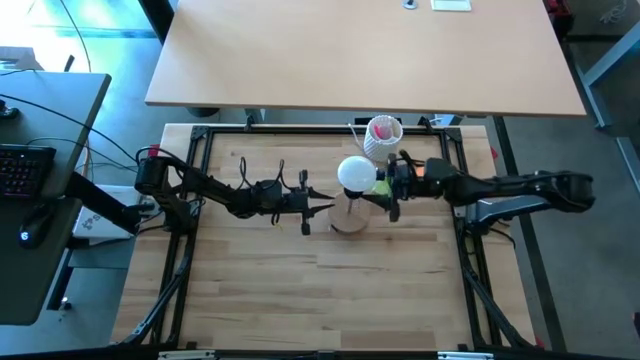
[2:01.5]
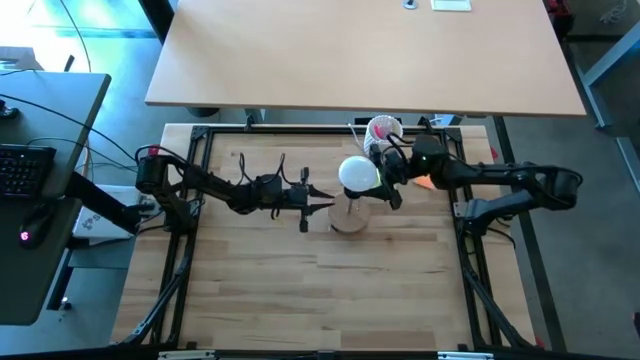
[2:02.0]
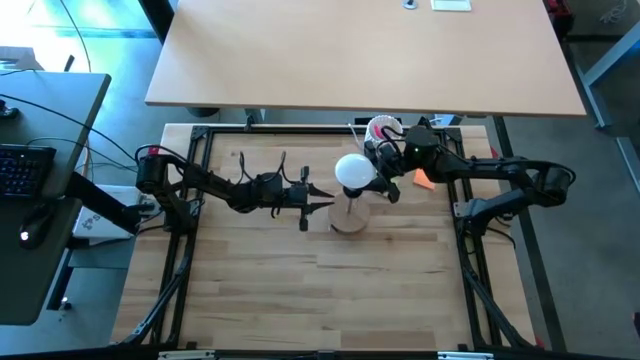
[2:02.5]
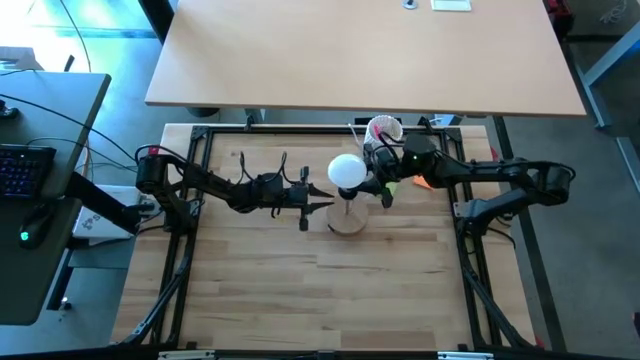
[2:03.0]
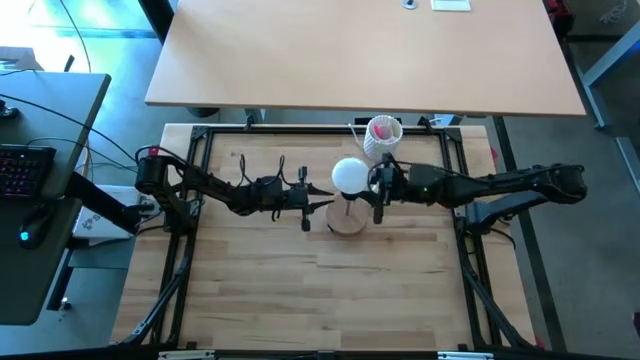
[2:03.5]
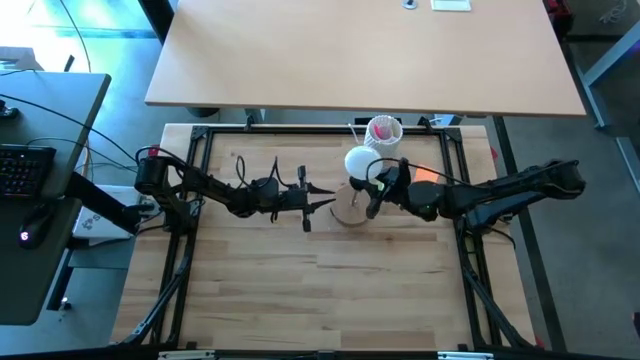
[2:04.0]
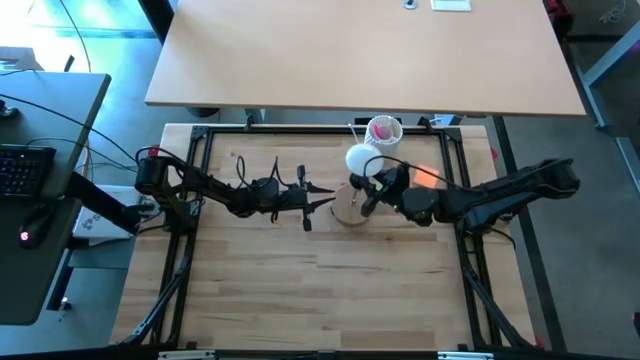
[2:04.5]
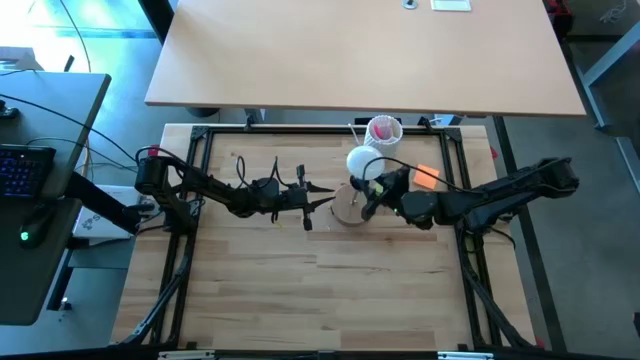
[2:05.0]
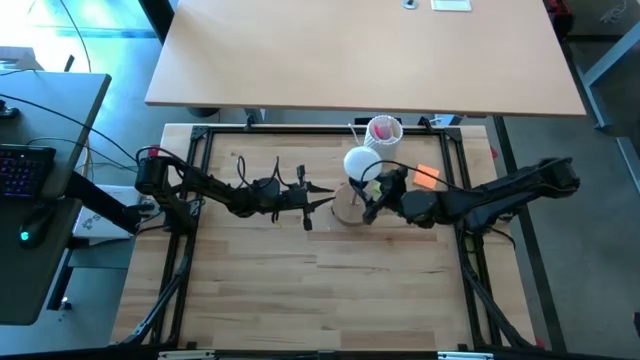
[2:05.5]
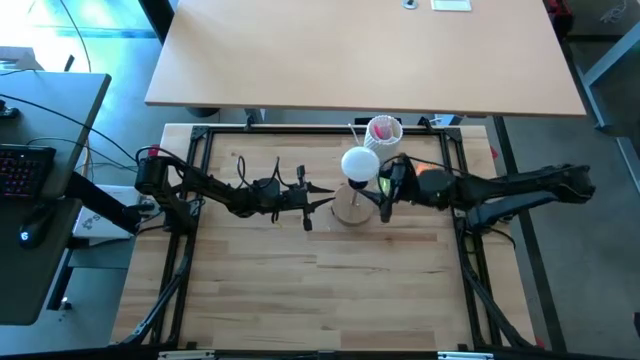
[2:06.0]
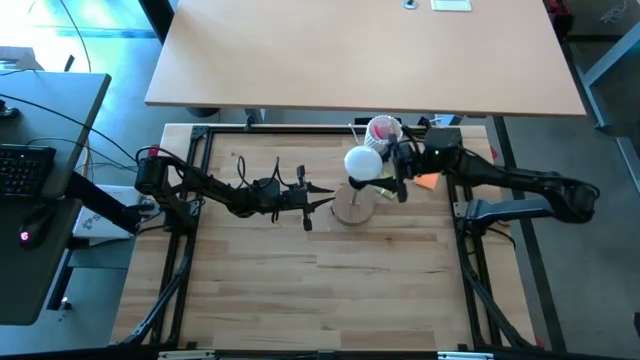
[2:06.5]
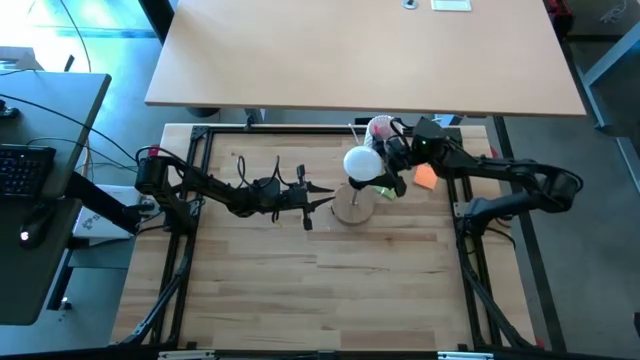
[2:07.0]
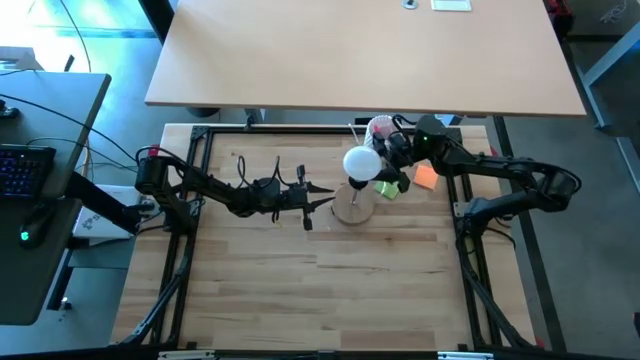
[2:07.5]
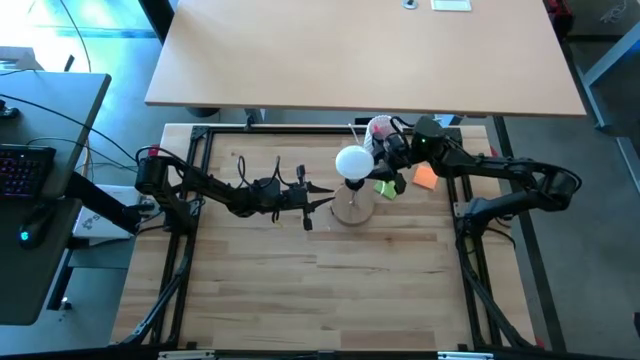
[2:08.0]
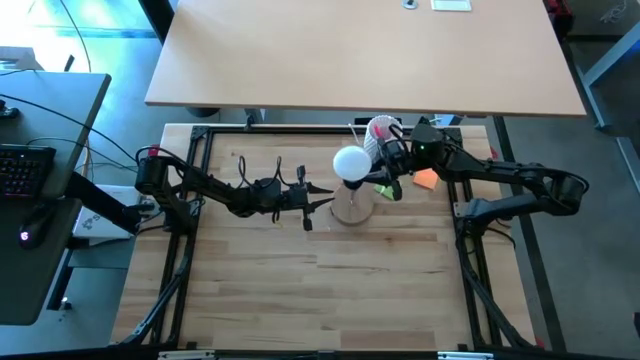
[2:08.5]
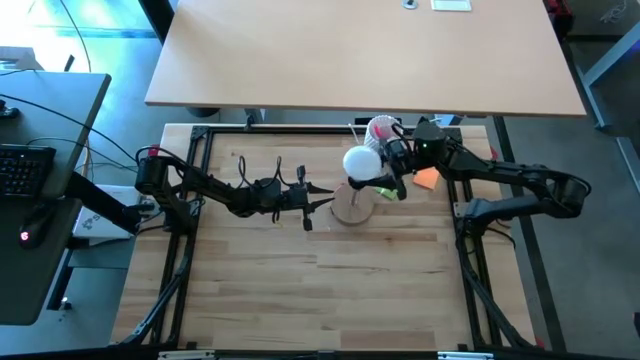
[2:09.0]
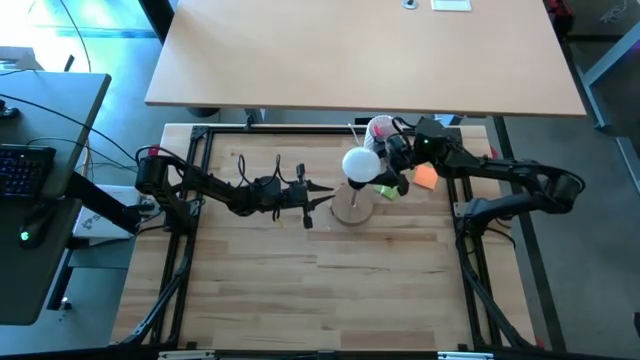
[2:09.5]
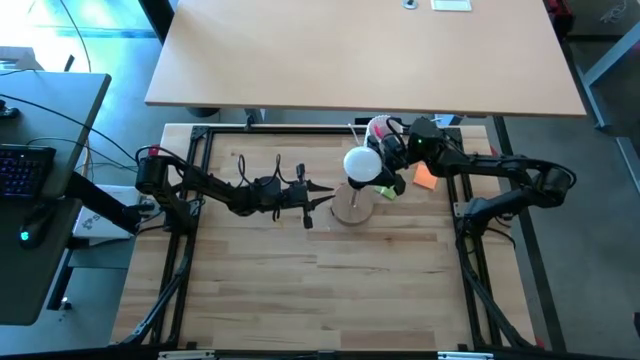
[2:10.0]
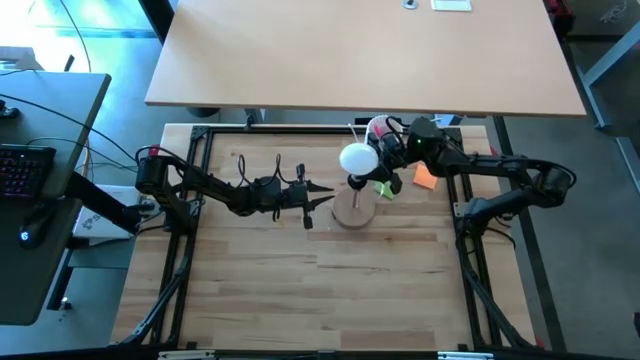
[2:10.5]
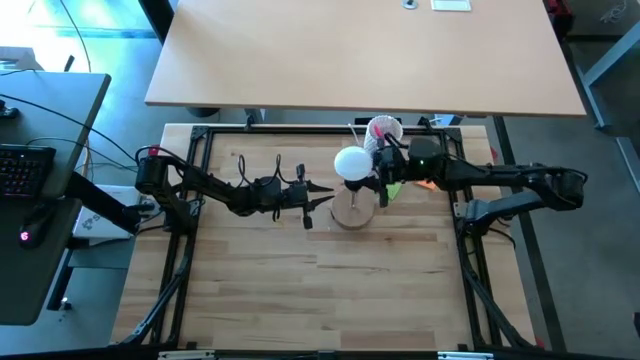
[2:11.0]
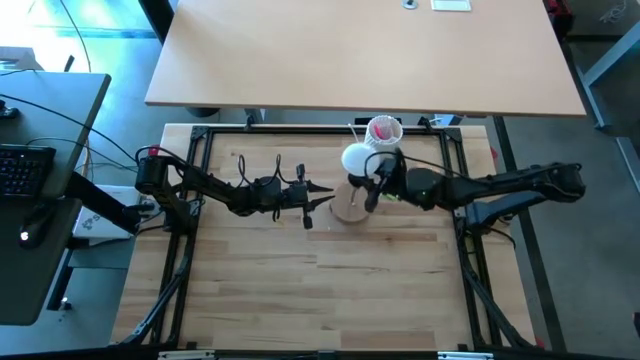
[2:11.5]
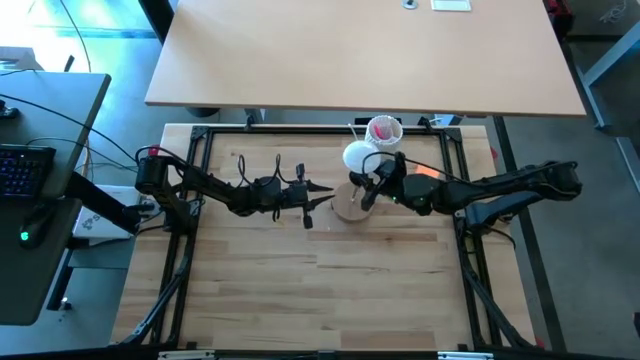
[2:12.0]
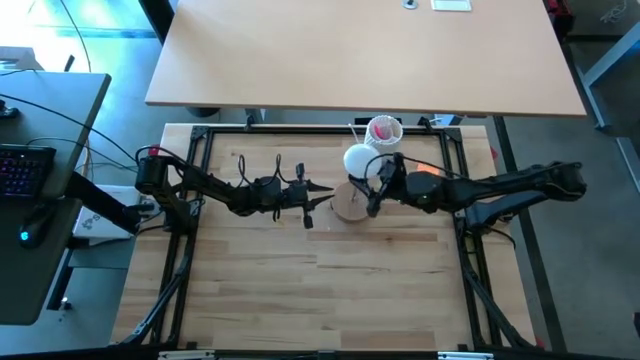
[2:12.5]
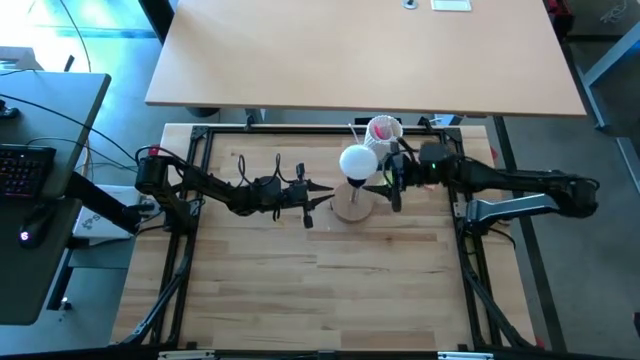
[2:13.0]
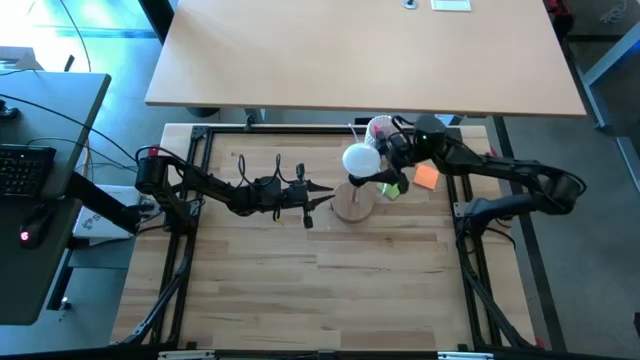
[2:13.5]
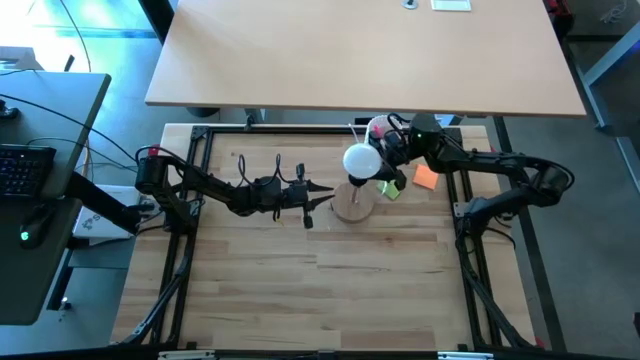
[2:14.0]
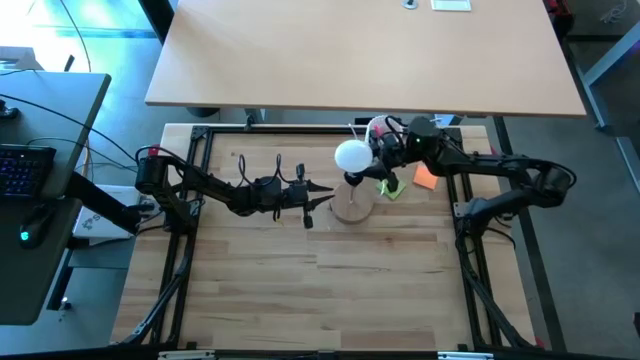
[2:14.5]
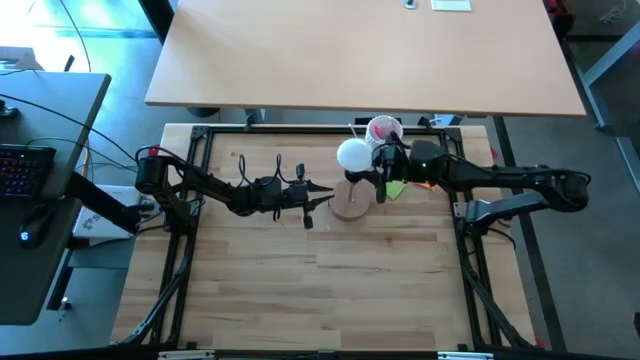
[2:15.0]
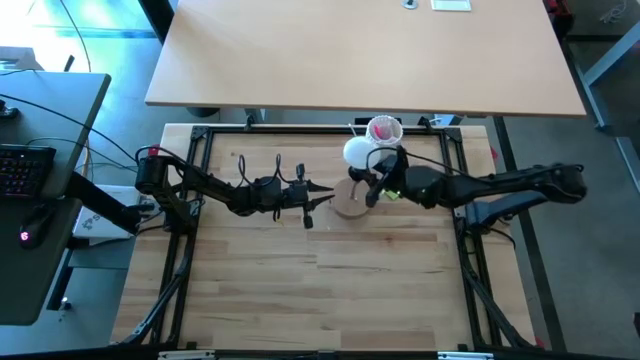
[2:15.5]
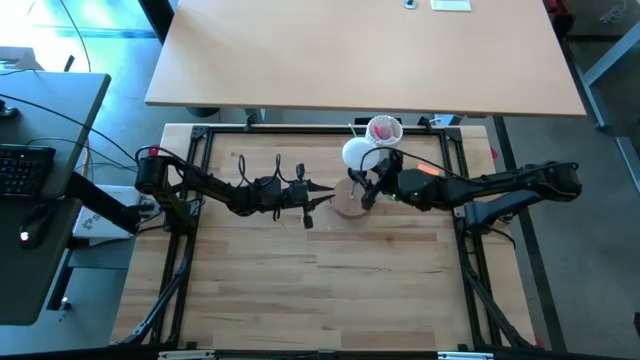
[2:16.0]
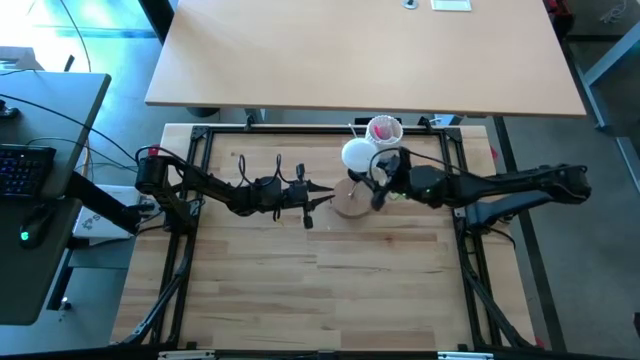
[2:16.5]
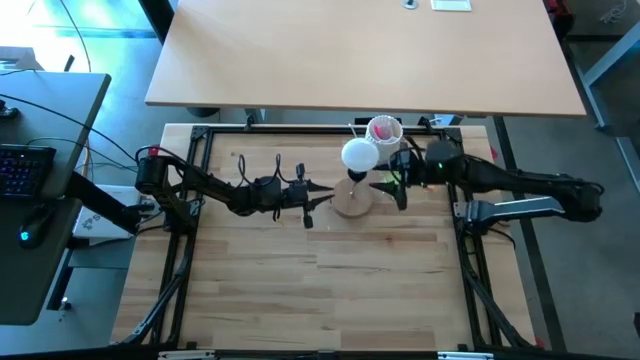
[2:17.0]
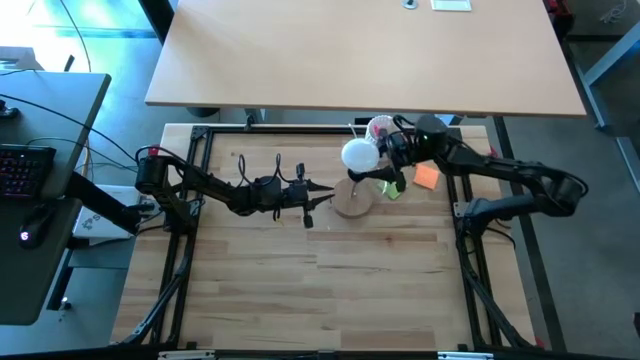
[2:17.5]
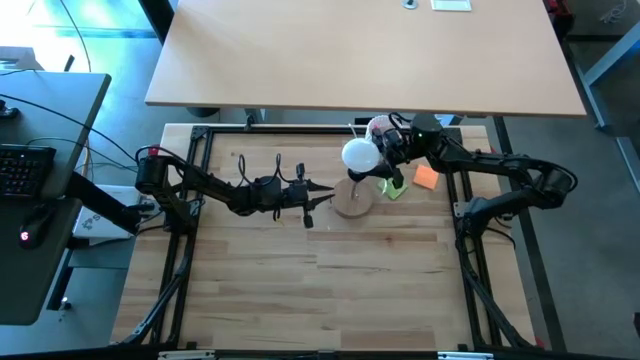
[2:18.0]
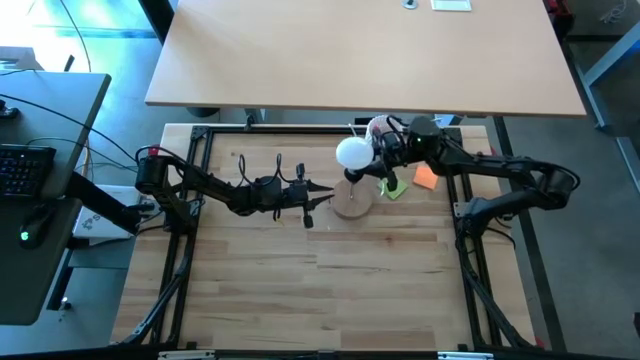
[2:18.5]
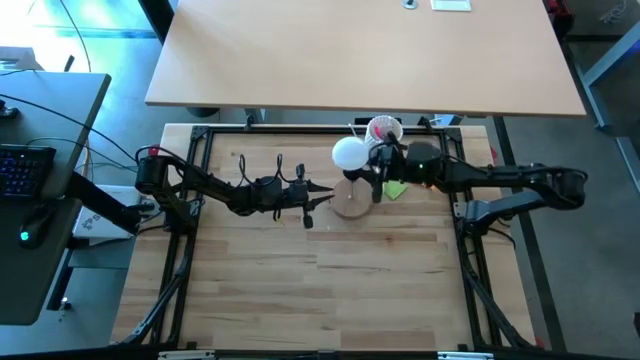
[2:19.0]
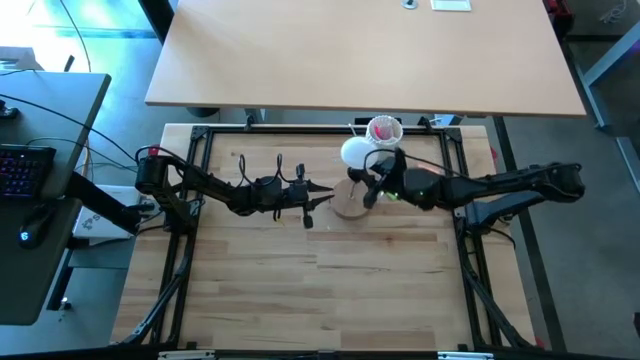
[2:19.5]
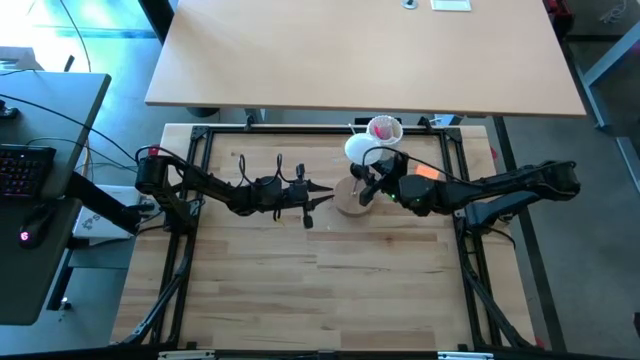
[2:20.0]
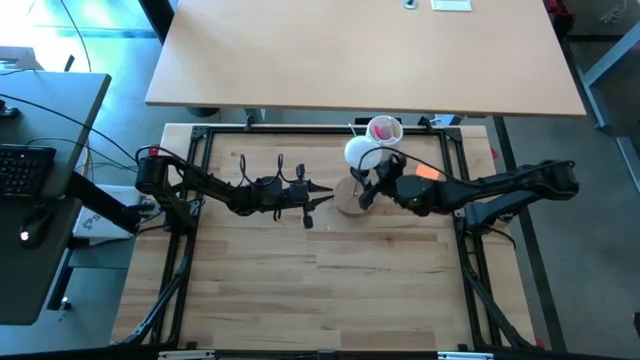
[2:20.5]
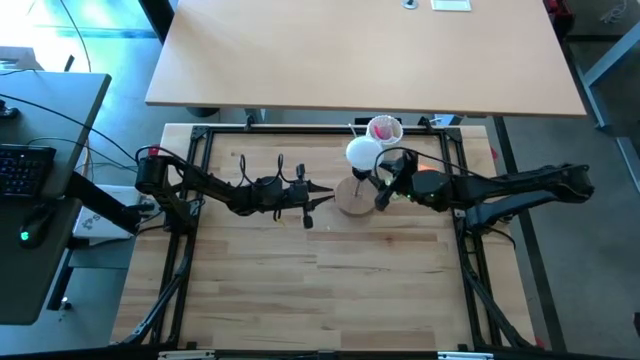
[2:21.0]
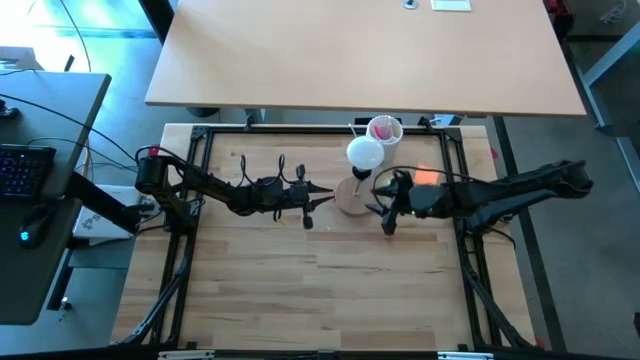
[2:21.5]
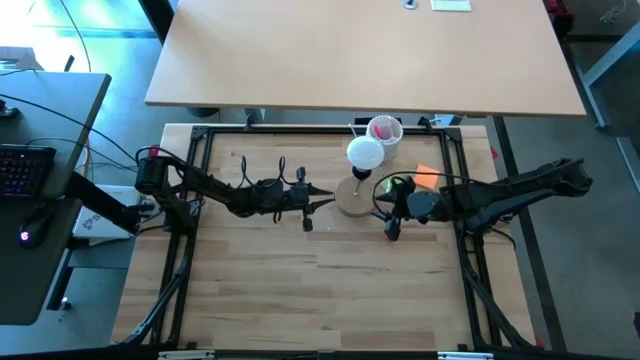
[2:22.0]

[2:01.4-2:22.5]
Task: Screw lightbulb
Insert the lightbulb into the lamp socket

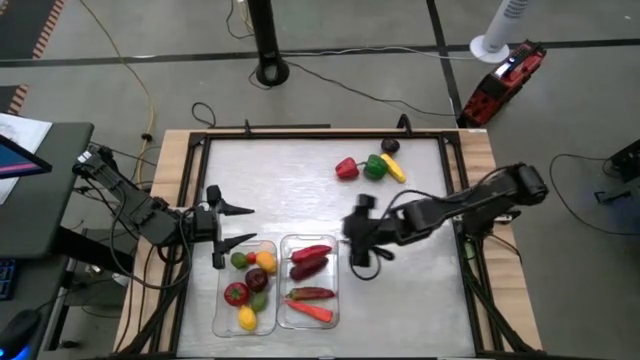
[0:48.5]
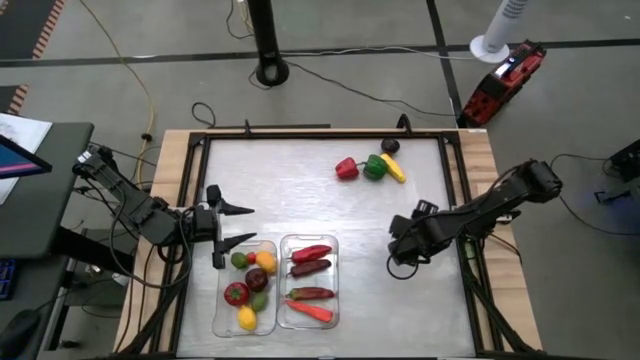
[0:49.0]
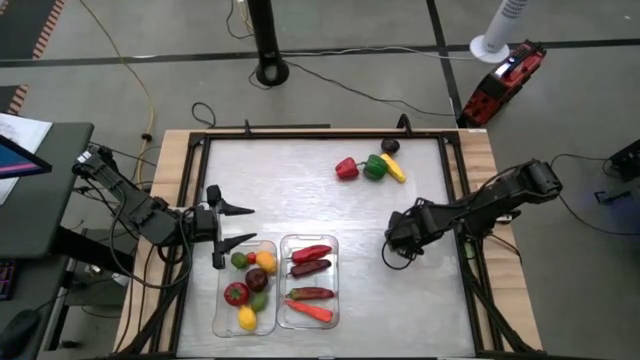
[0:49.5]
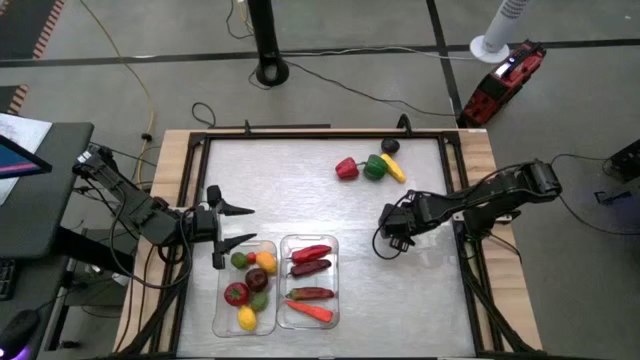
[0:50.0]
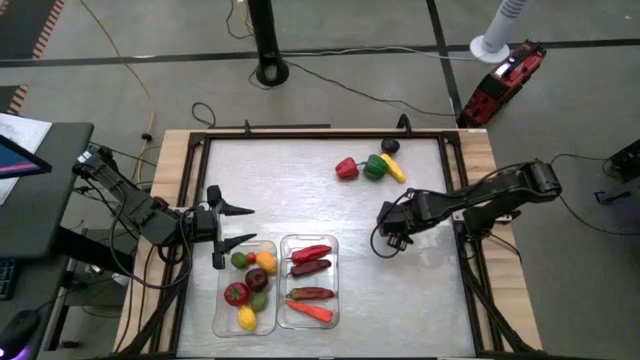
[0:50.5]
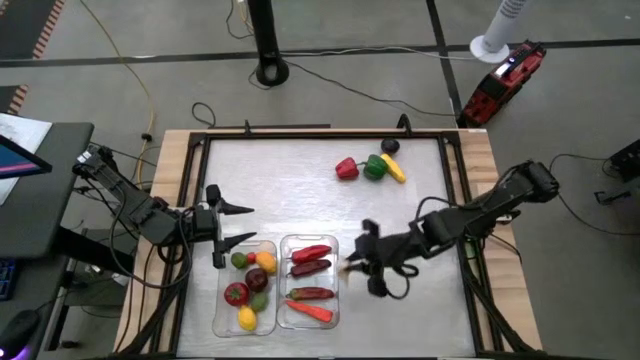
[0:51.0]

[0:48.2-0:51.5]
Task: Sort produce into baskets
Put the white garlic into the right transparent bin
